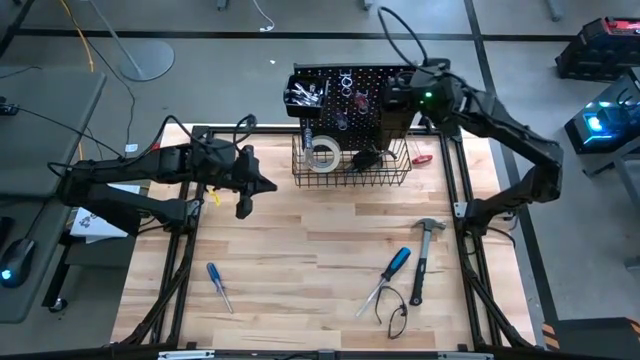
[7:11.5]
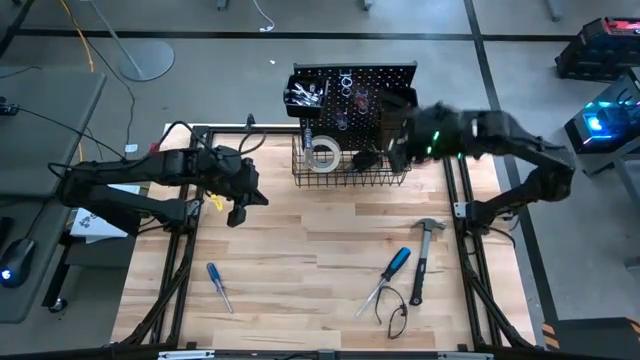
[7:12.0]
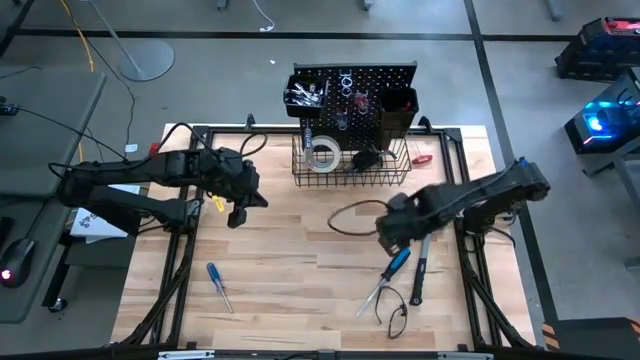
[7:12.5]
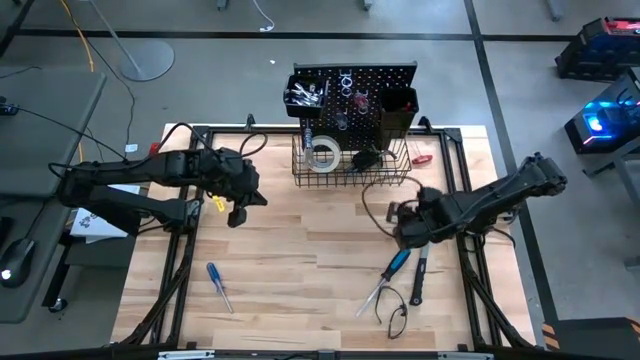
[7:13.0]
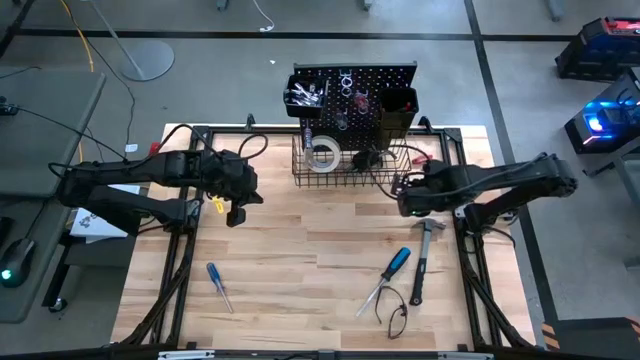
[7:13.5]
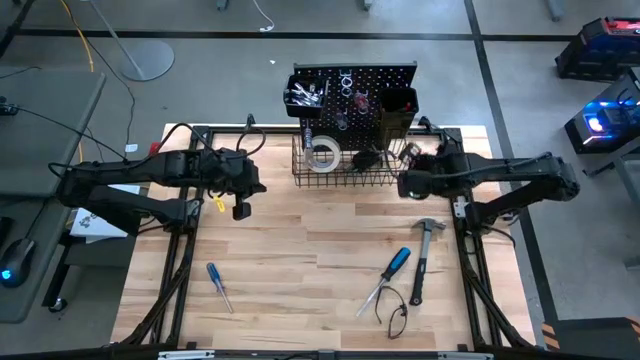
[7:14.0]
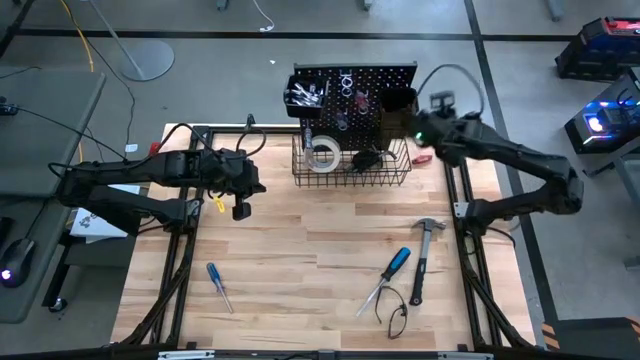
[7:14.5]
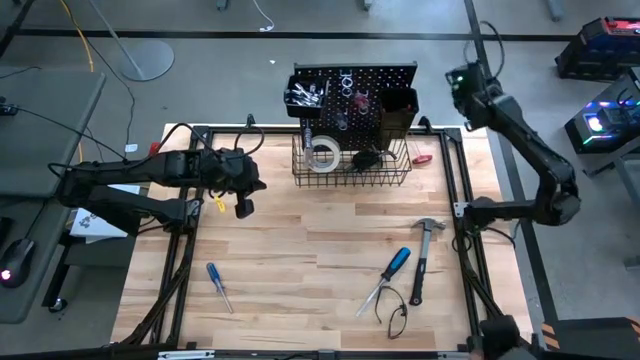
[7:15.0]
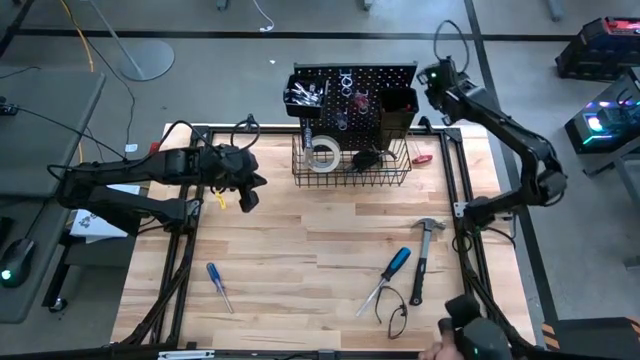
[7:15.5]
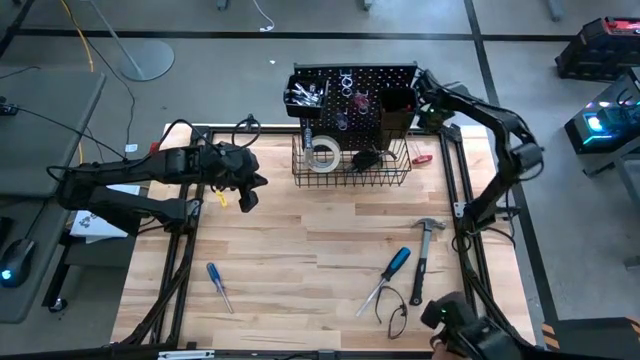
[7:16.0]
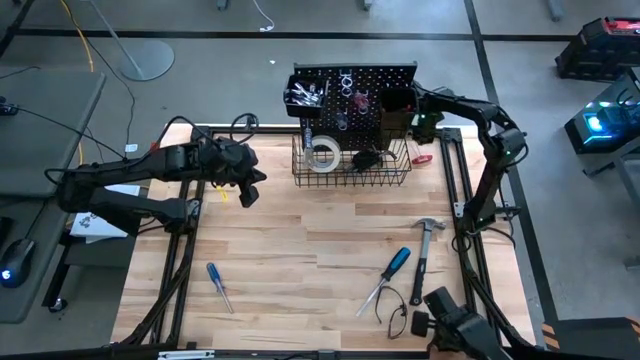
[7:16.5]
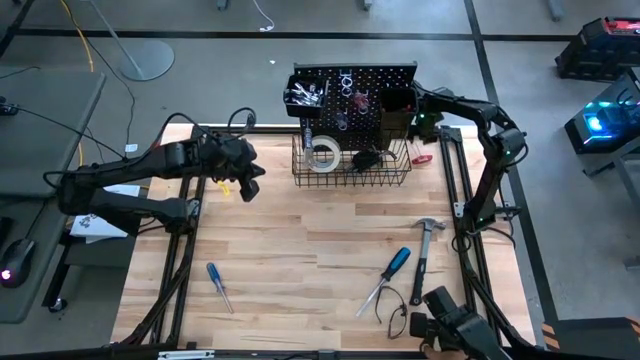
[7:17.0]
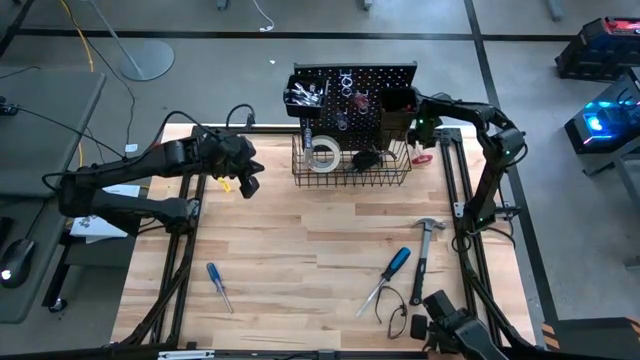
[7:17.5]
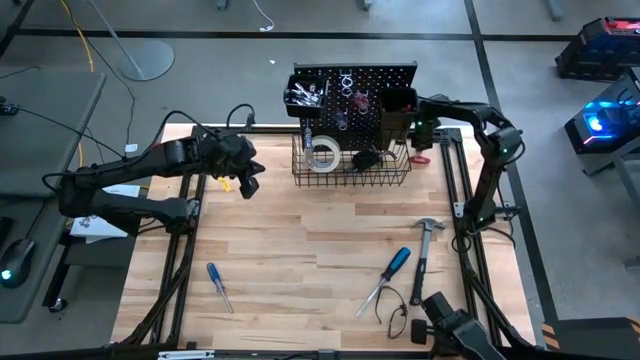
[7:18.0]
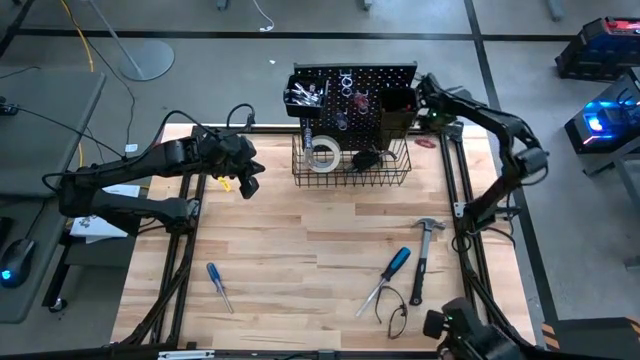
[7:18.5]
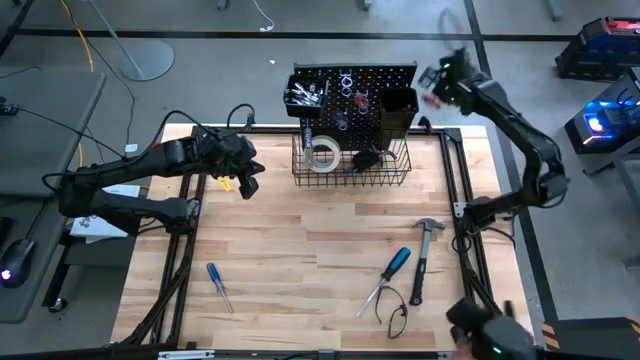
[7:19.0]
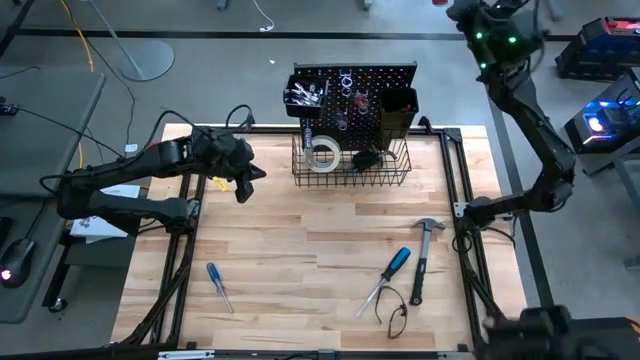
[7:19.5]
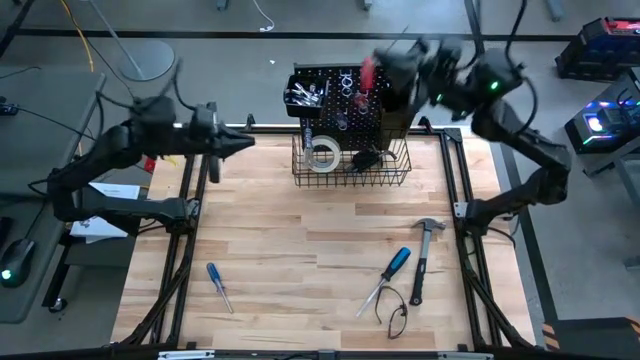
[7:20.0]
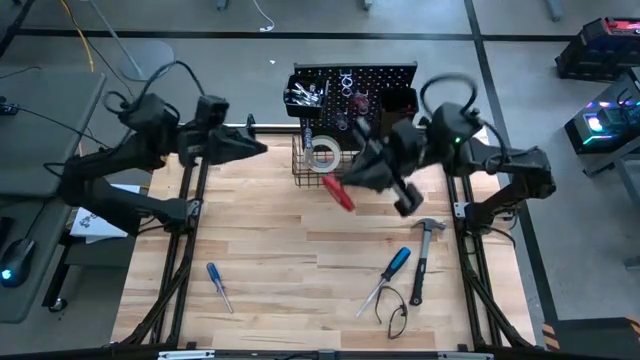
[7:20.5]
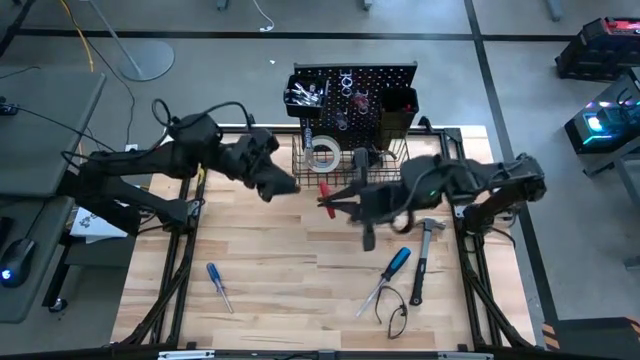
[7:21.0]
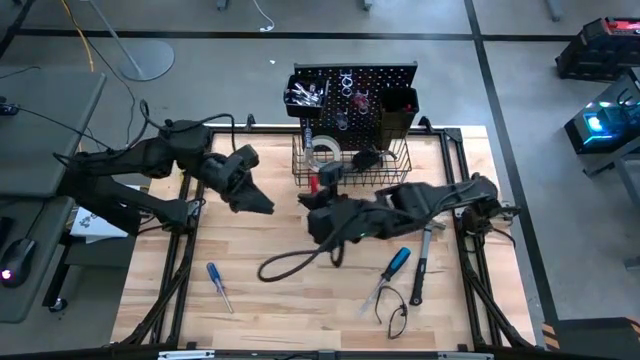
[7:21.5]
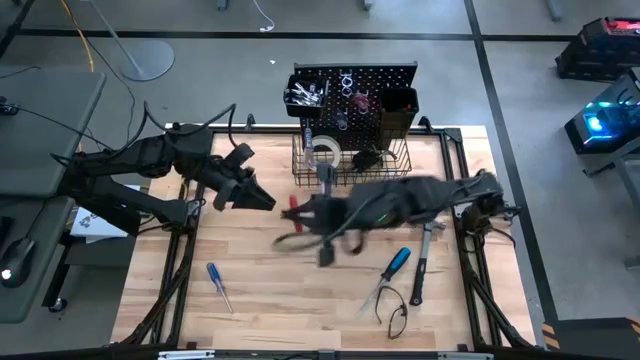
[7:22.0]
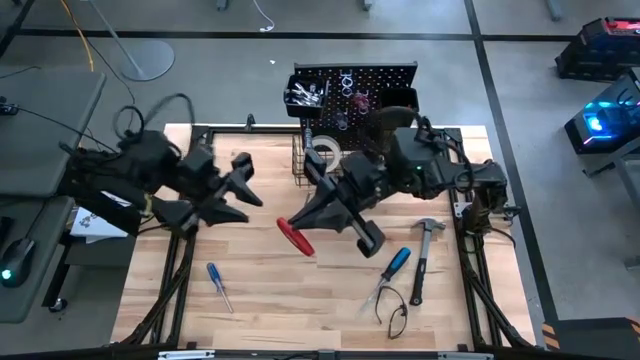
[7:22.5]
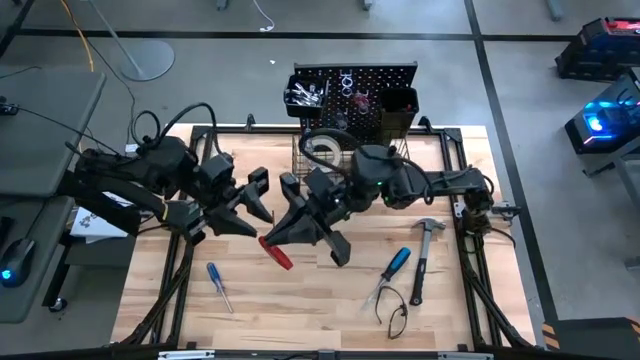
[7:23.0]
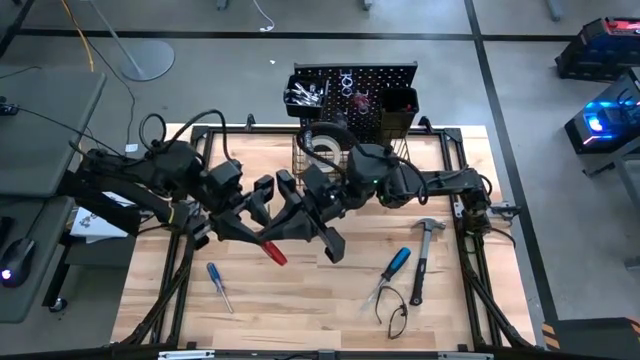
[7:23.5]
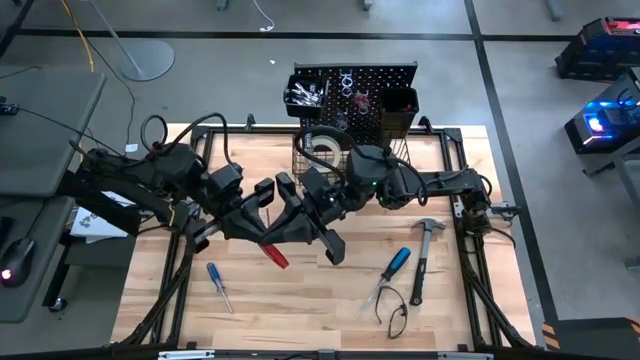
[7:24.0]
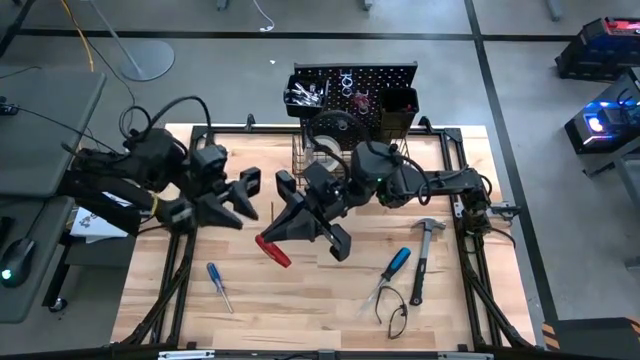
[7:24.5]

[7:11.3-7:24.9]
Task: Hang tools onto peg board
Put the red allen wrench in the right black bin on the pegboard

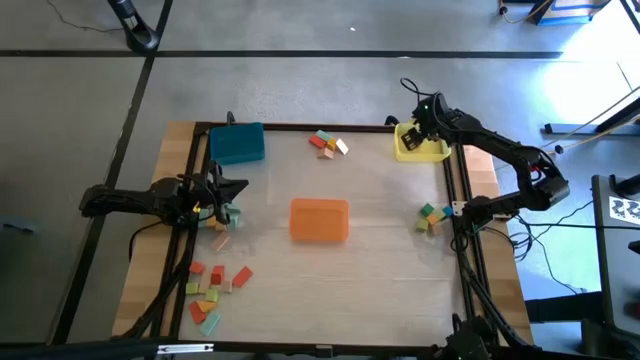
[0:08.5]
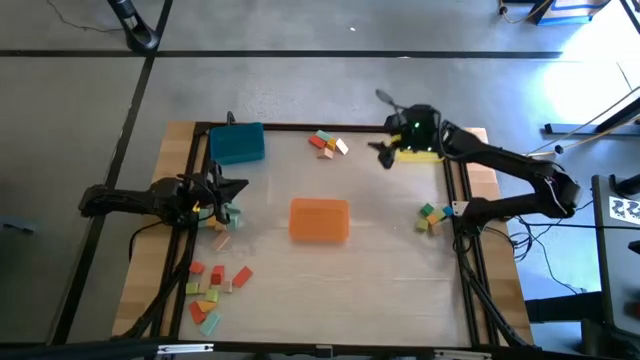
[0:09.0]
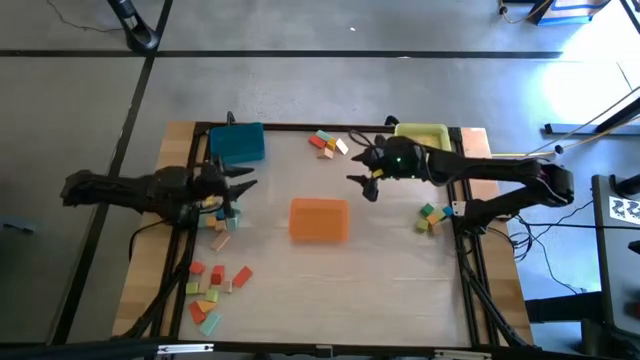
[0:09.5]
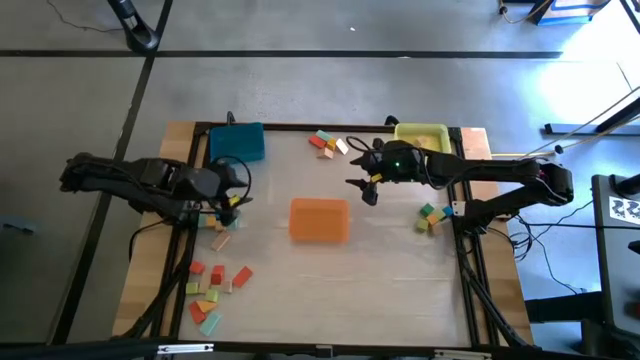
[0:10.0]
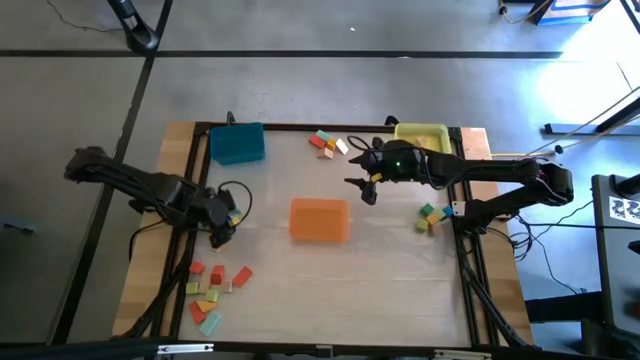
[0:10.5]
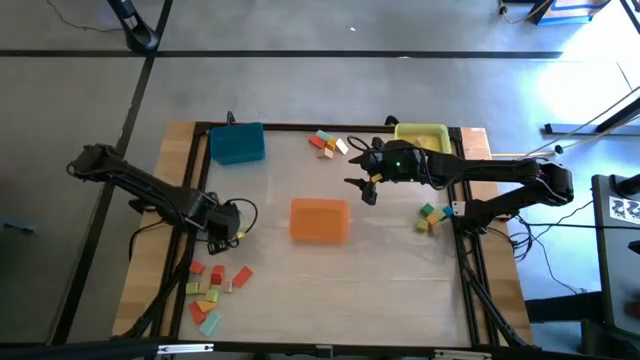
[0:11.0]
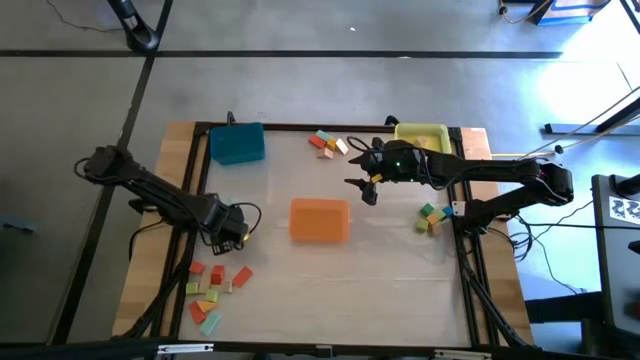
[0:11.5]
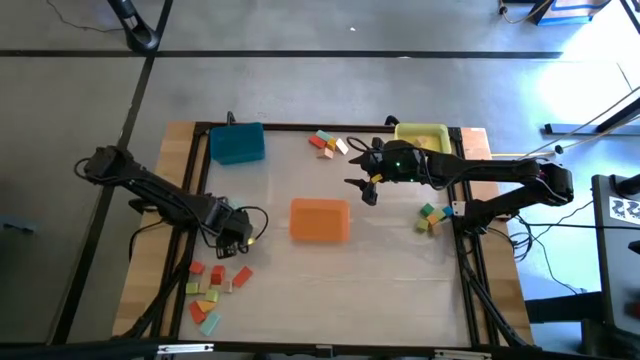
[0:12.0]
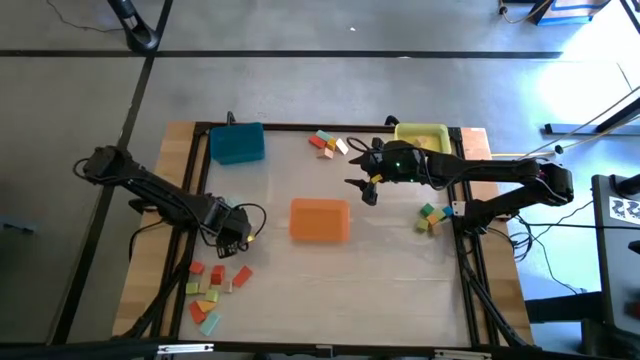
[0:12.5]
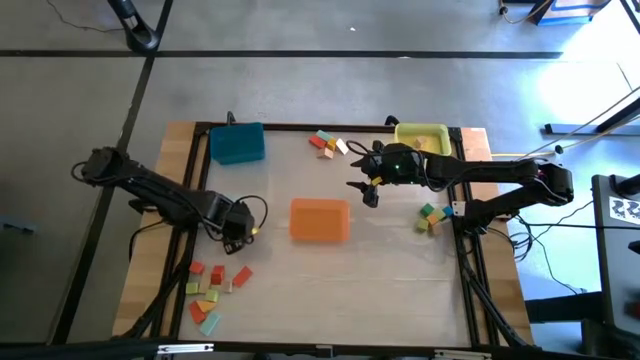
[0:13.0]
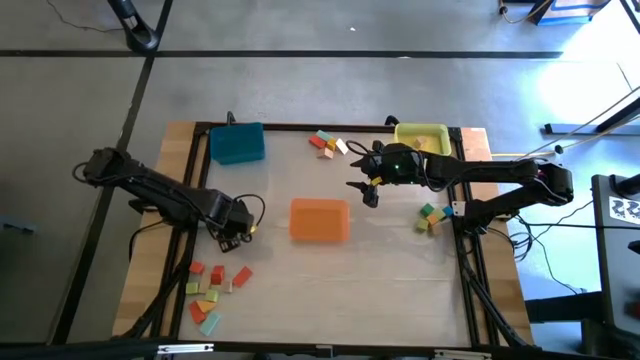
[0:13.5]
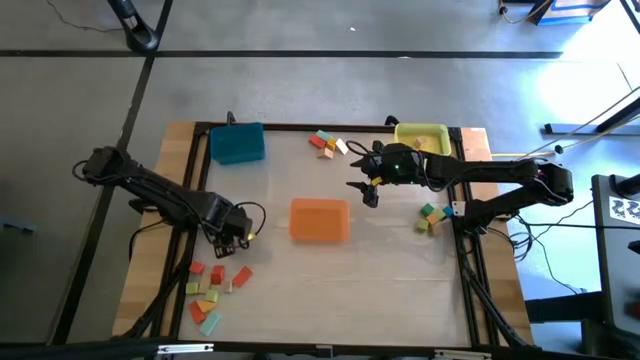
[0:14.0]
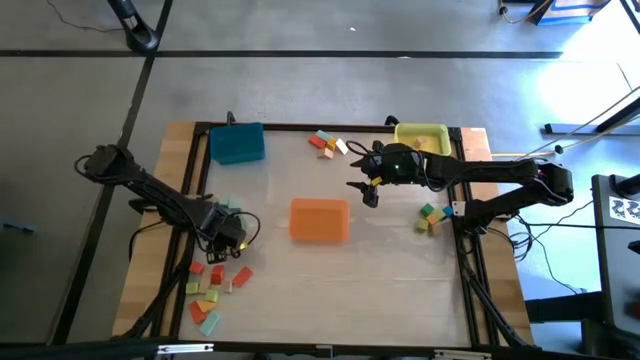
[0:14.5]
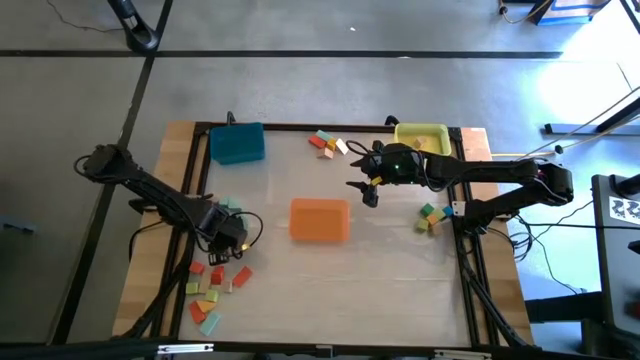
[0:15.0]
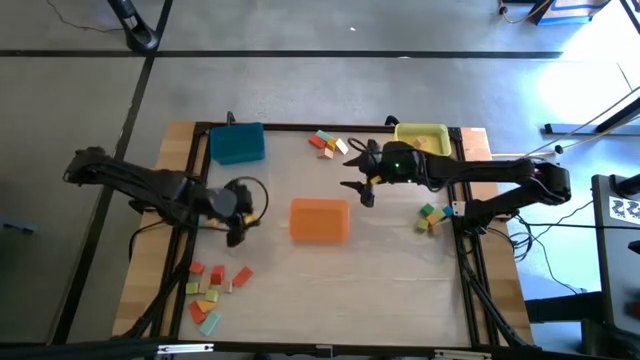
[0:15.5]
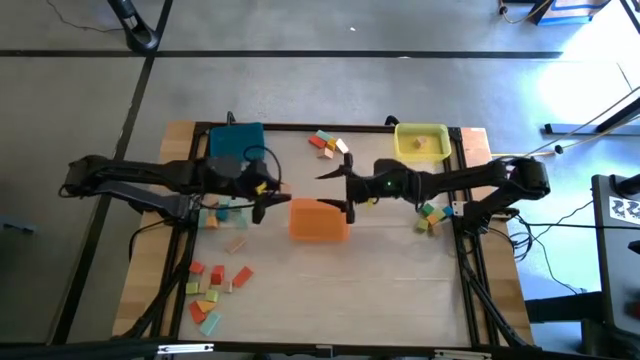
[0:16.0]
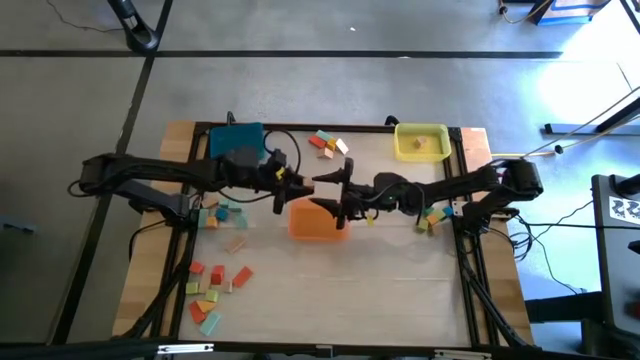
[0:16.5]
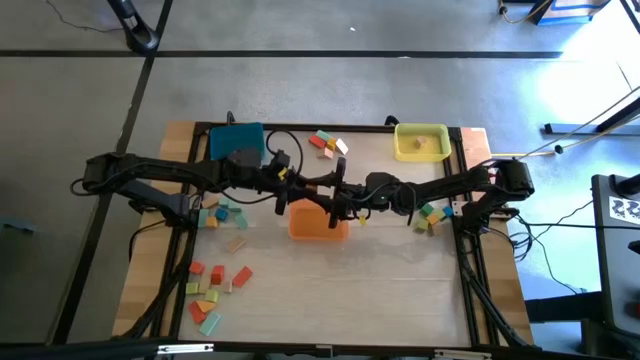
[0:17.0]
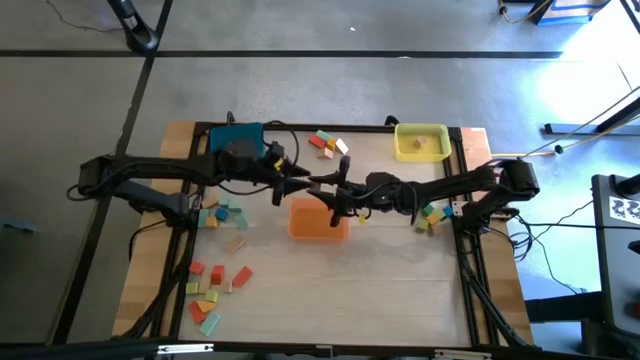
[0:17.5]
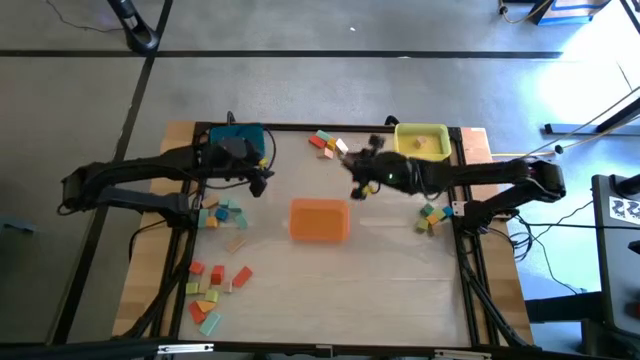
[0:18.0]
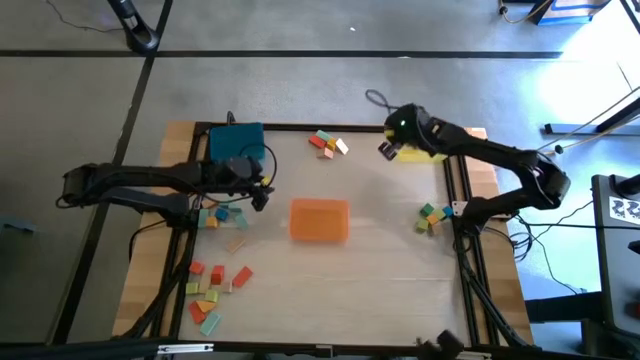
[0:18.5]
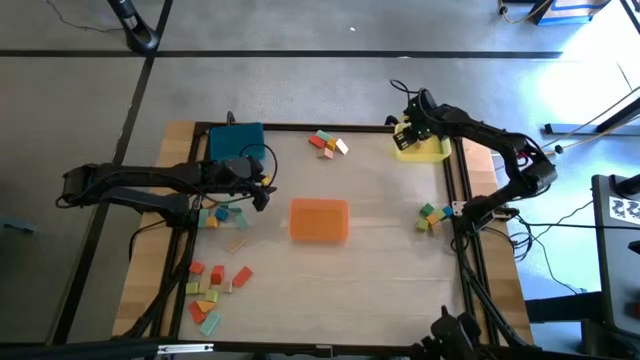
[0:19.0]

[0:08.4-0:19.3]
Task: Sort blocks by size
Put the brown cube block into the yellow bin
